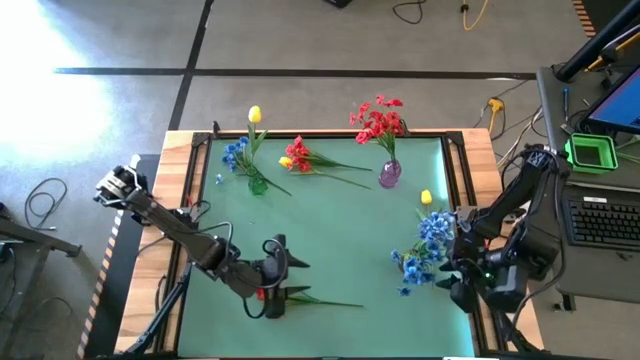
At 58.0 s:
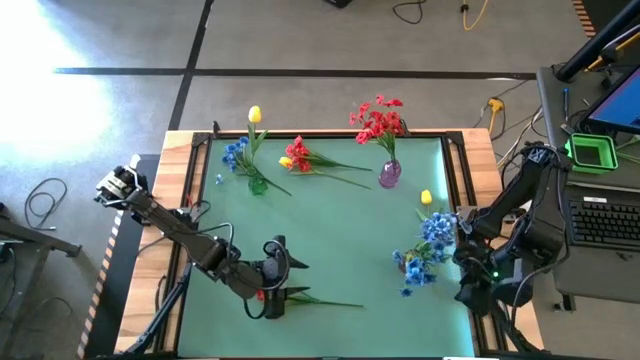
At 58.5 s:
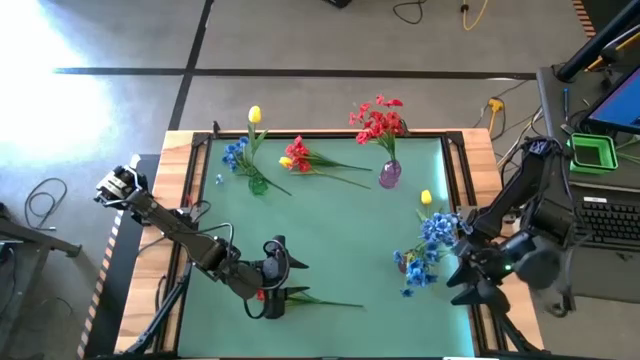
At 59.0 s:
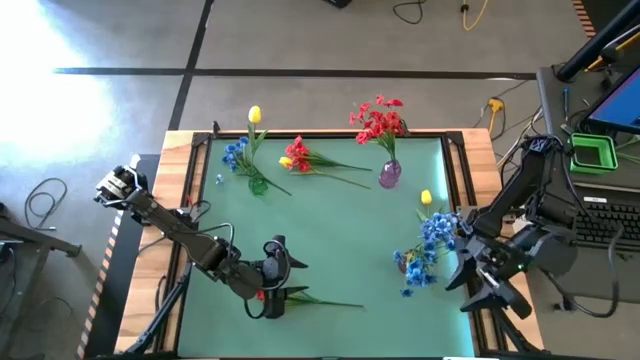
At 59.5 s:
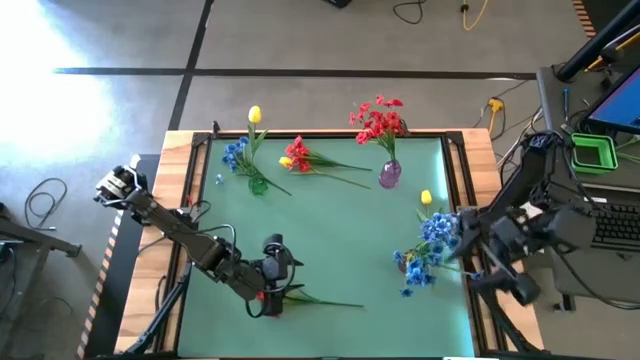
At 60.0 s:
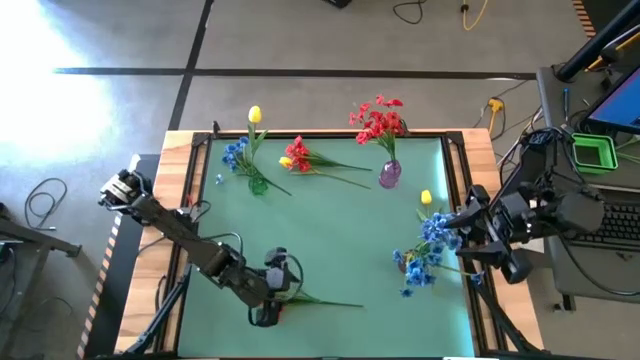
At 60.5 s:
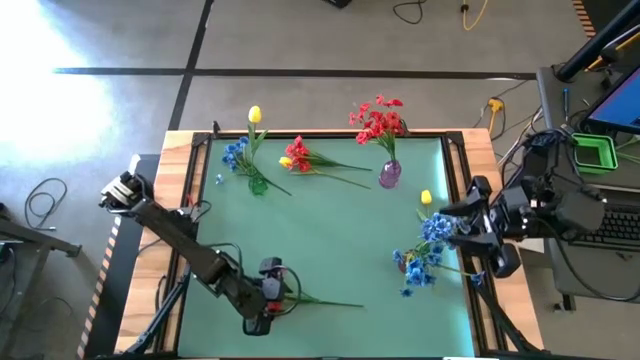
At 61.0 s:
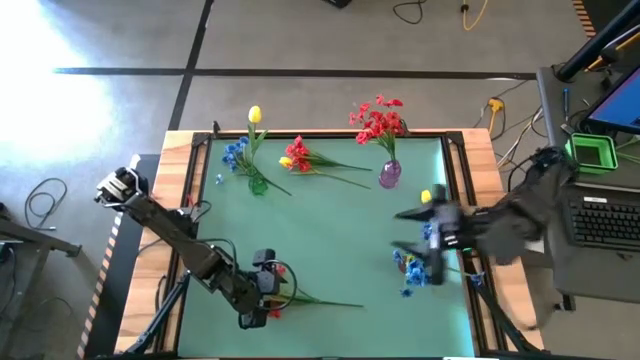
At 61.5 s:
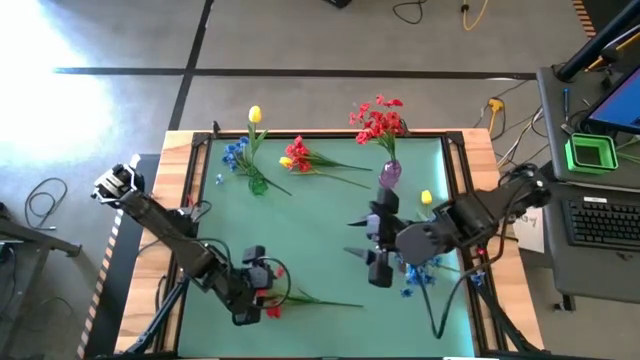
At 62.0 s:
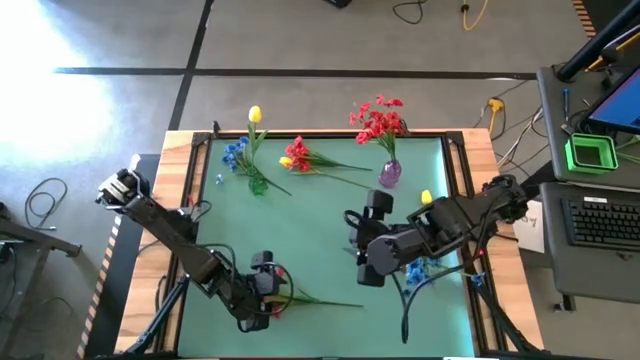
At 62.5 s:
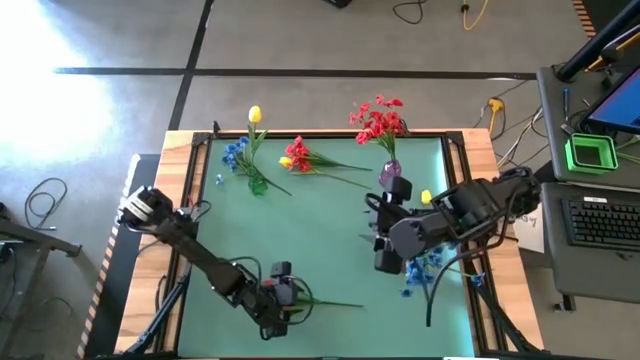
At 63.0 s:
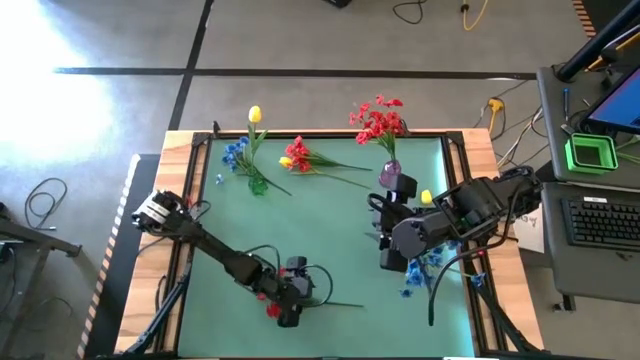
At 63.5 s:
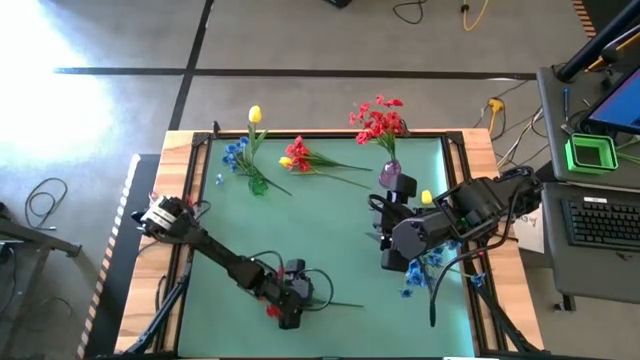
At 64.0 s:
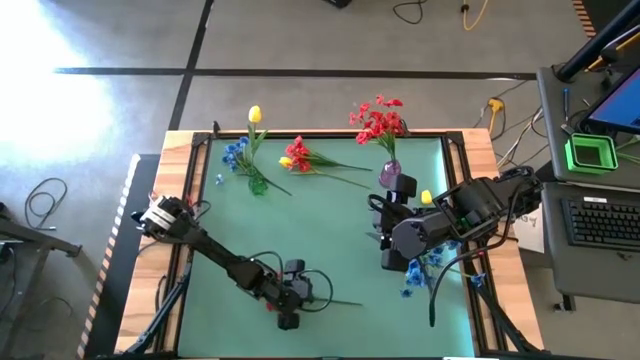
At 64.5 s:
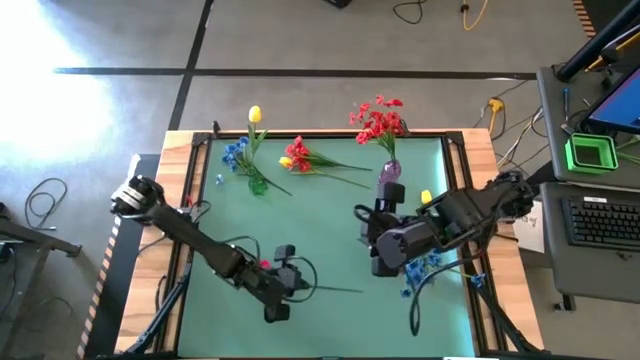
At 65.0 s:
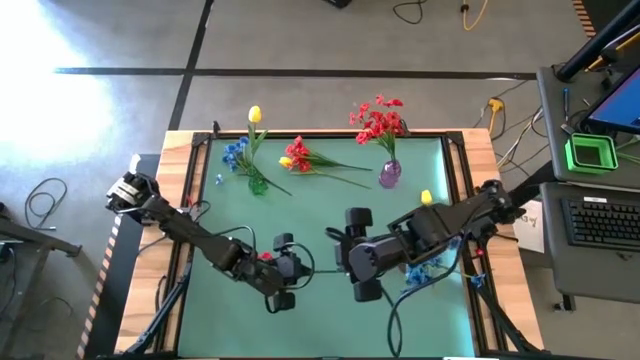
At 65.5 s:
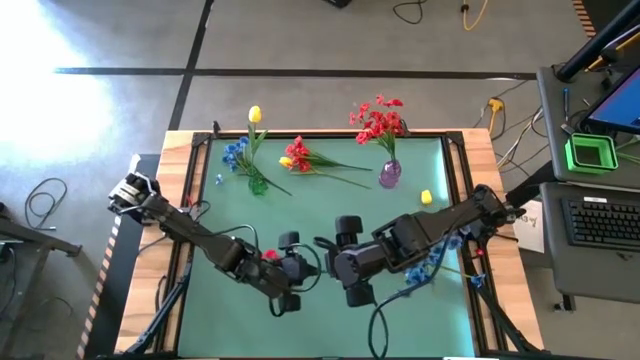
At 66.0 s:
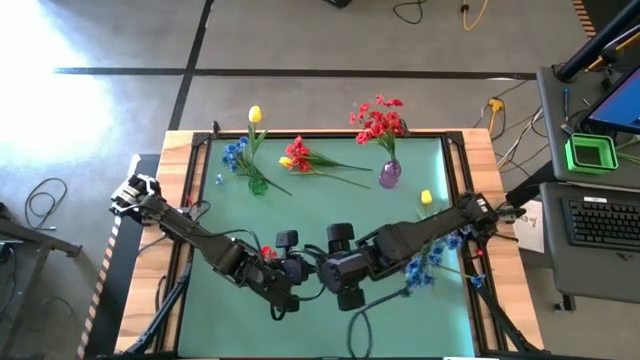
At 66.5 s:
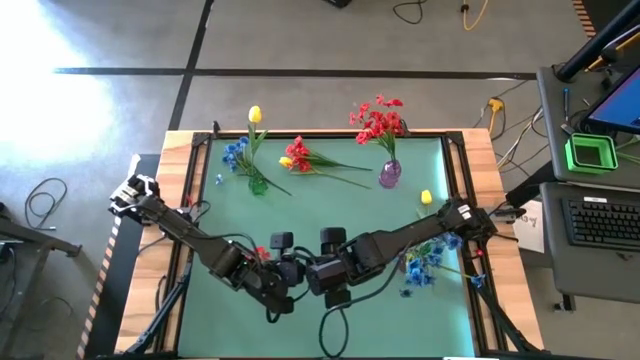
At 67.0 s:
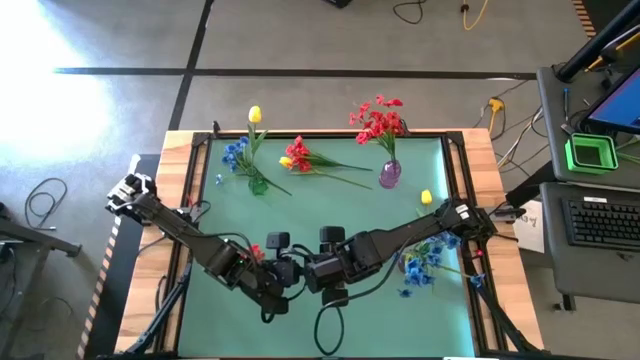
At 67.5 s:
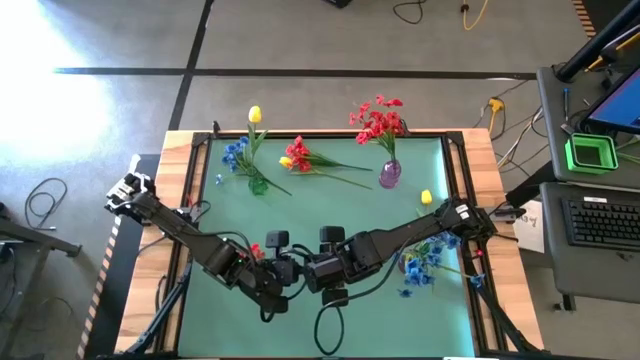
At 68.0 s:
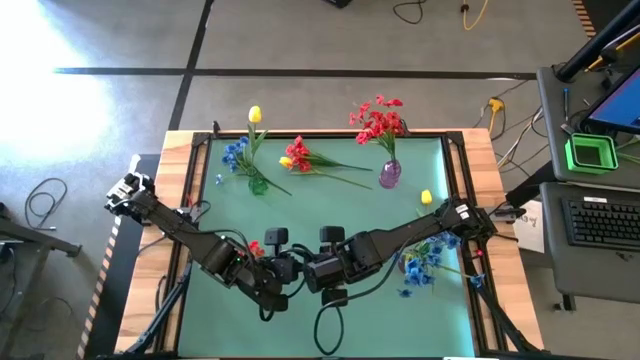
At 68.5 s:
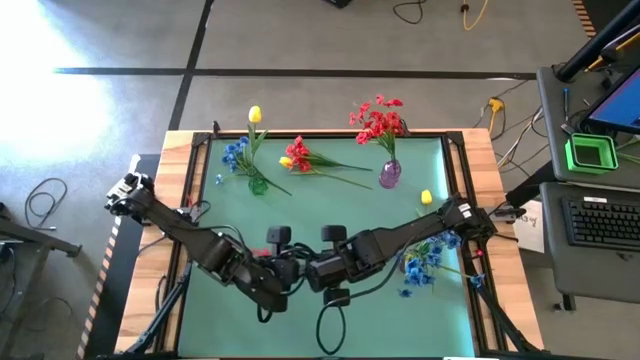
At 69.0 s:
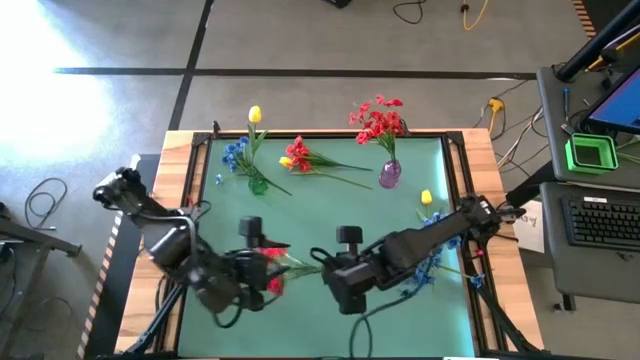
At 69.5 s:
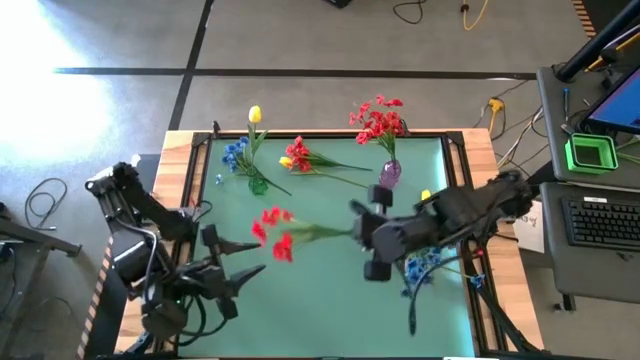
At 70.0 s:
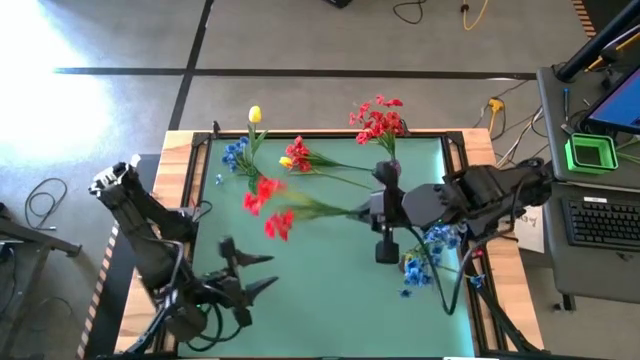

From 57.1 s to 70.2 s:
Task: Sort flowers into vase by color
Put the bottom red flower into the purple vase

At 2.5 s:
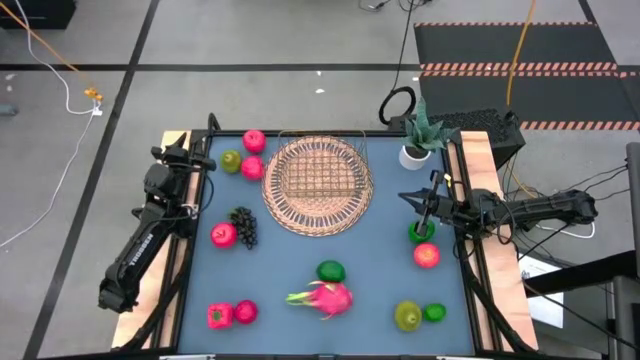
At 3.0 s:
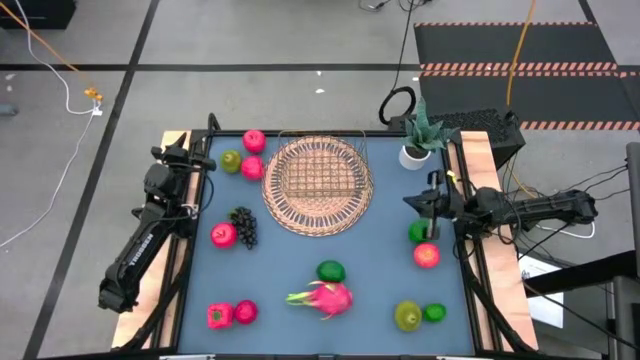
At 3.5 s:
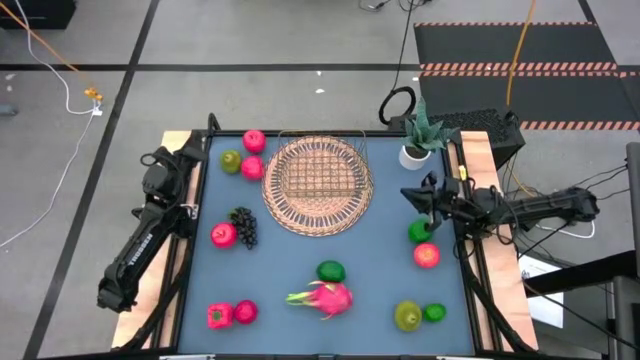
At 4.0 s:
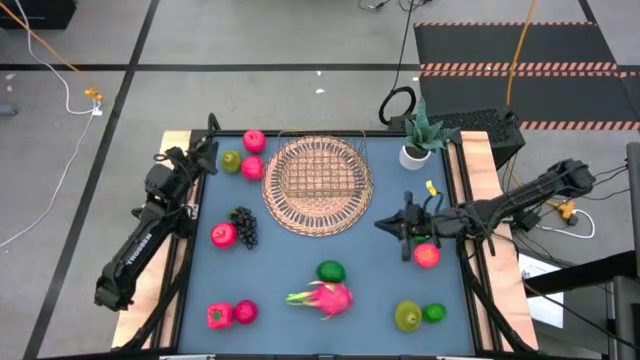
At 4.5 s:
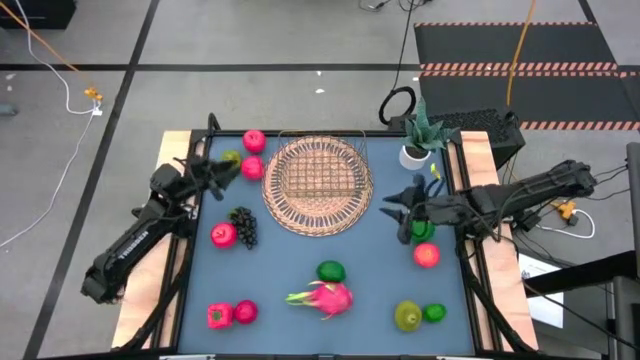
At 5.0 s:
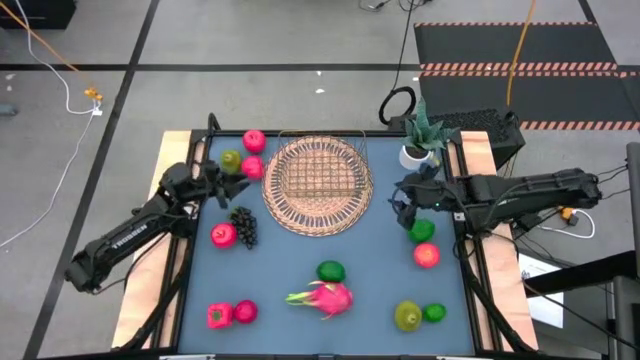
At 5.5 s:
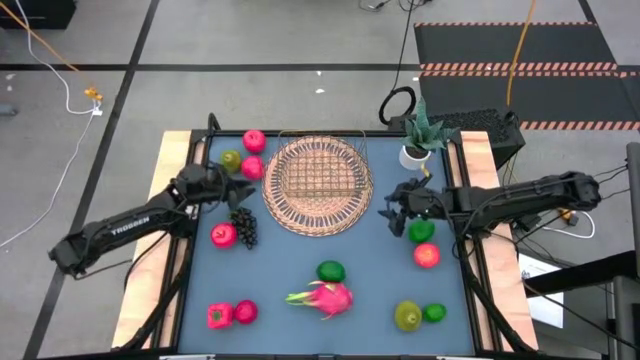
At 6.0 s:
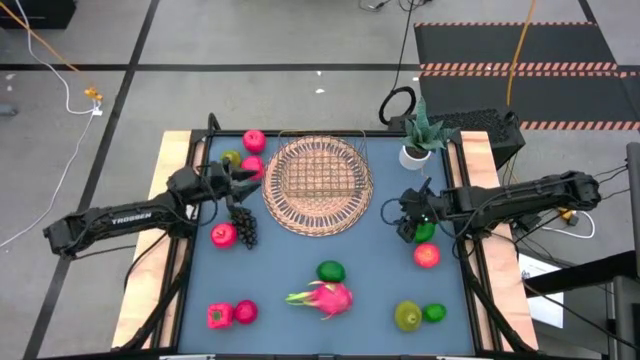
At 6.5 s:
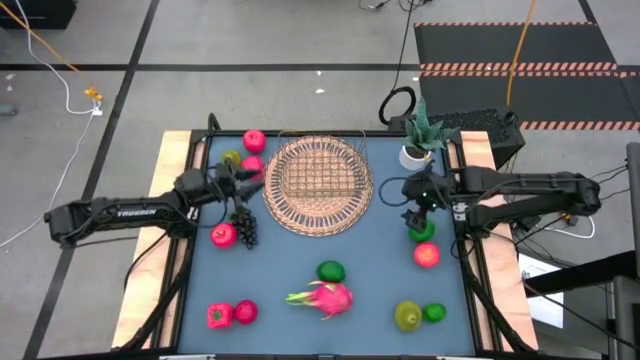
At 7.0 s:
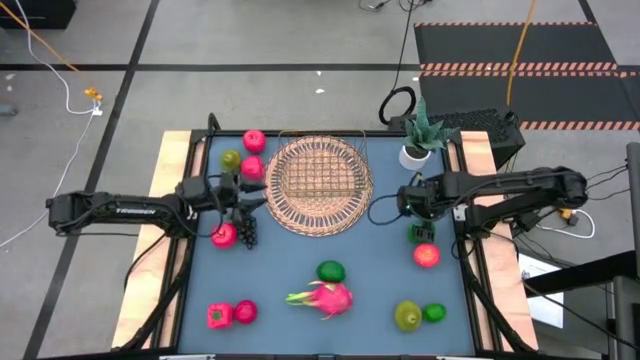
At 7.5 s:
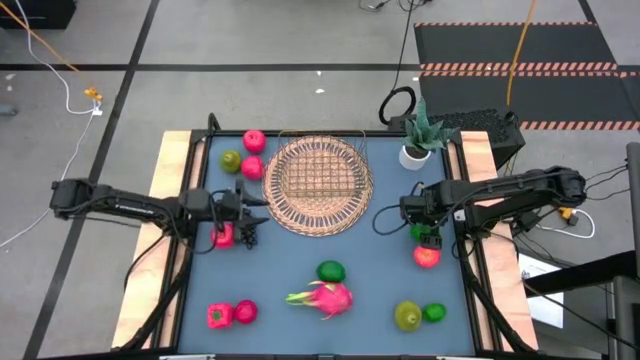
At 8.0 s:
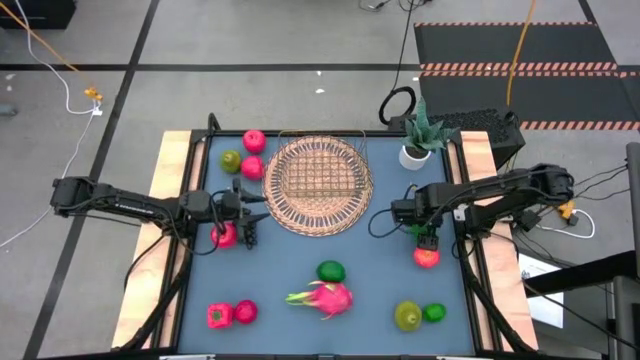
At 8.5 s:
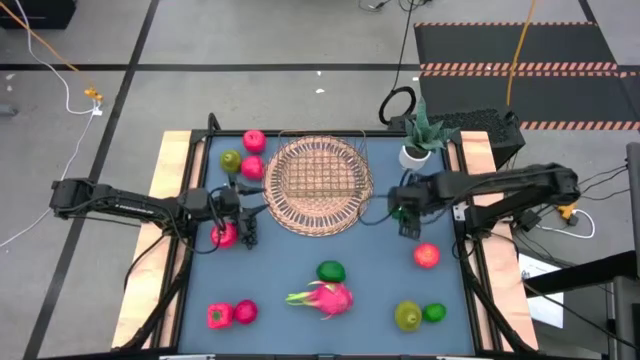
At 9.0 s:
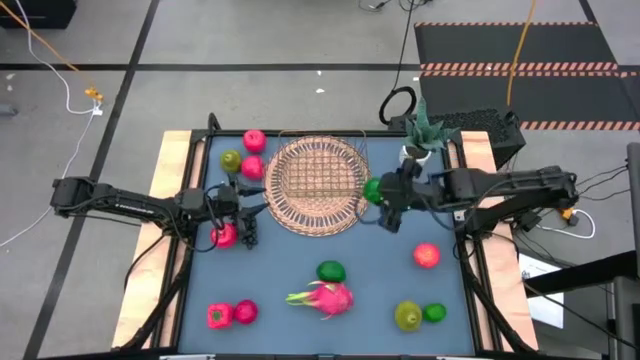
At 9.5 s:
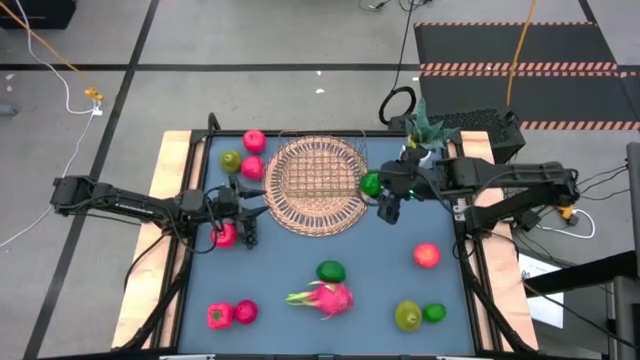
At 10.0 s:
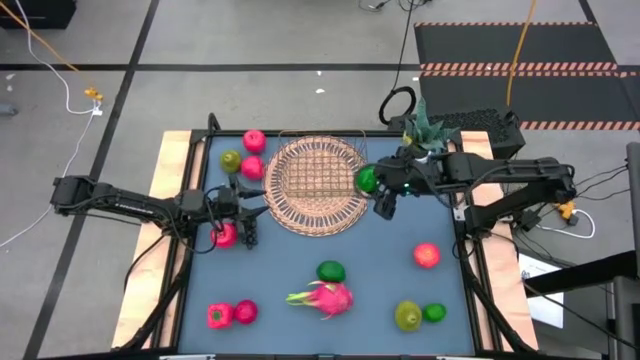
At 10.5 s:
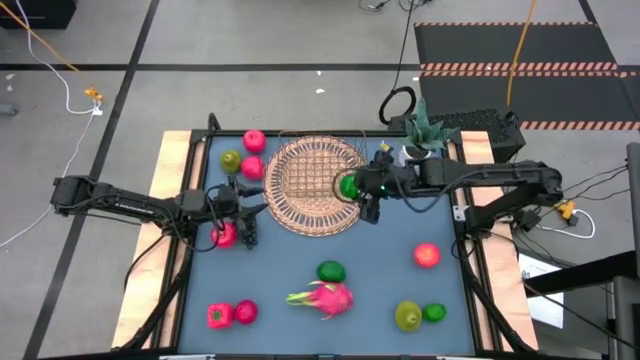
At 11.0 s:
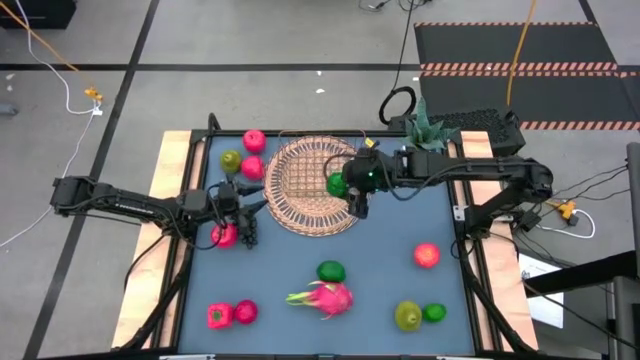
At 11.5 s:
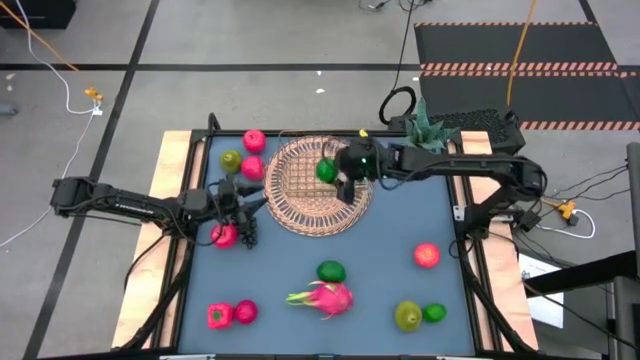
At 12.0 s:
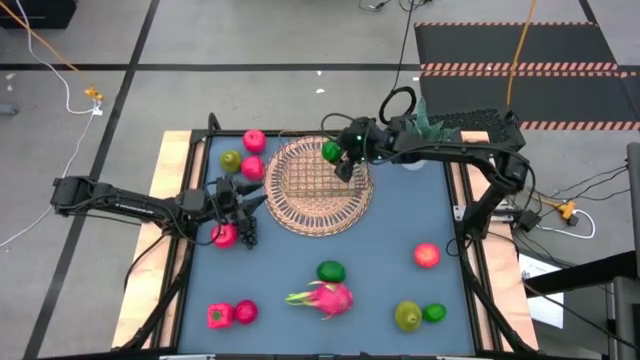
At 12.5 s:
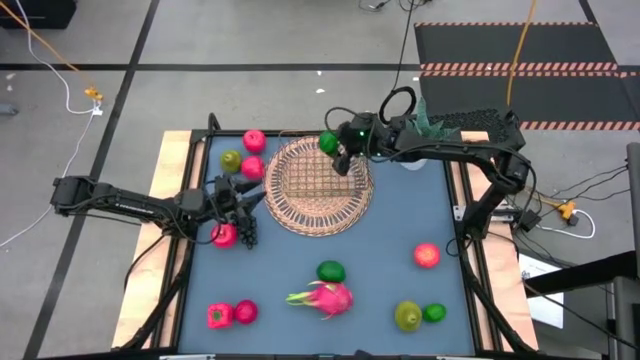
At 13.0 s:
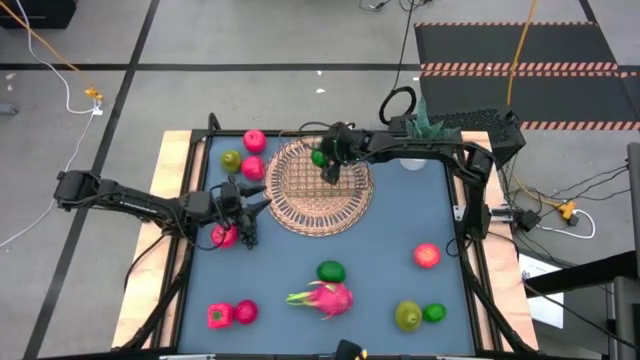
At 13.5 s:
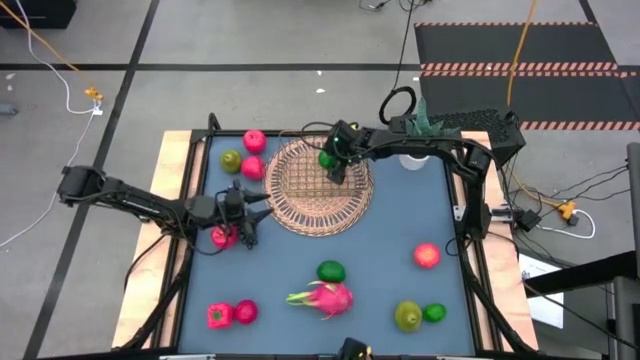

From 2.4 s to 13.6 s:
Task: Build produce basket
Put the lime into the gold wire basket
